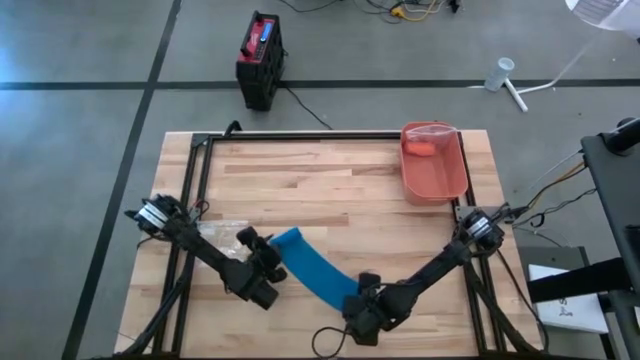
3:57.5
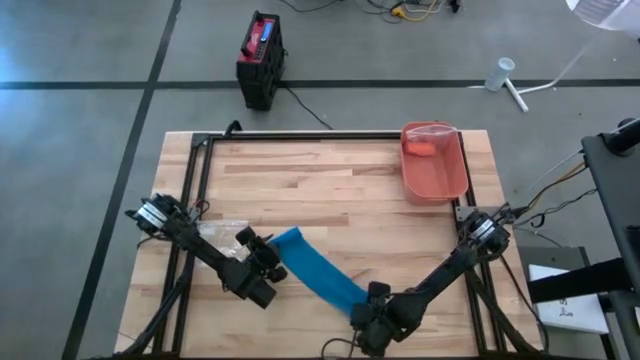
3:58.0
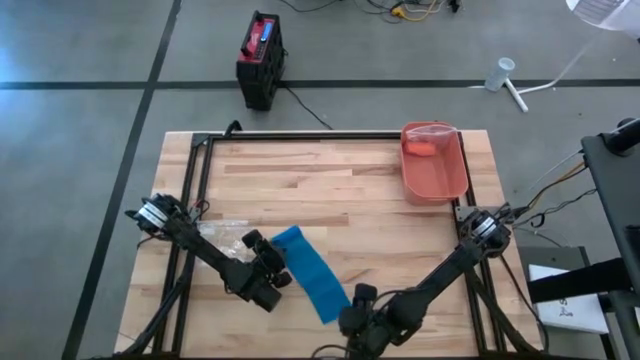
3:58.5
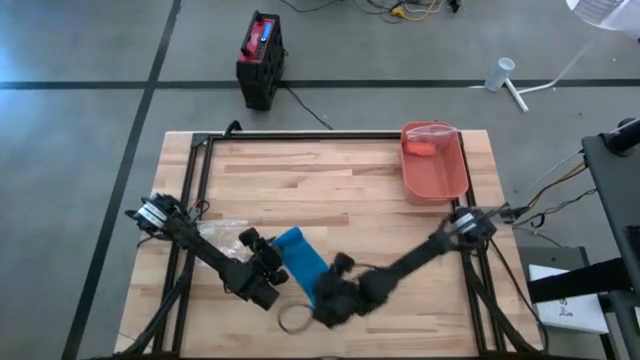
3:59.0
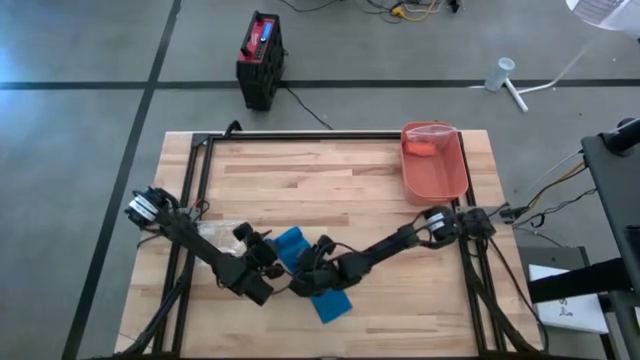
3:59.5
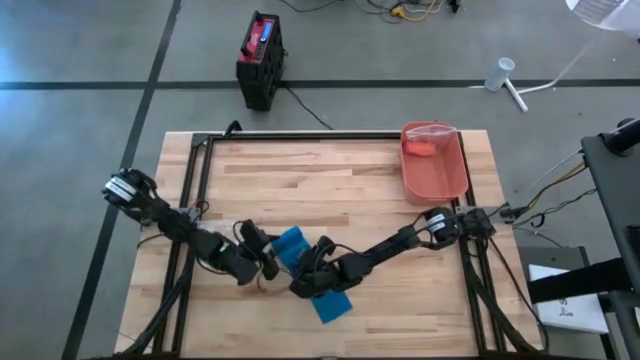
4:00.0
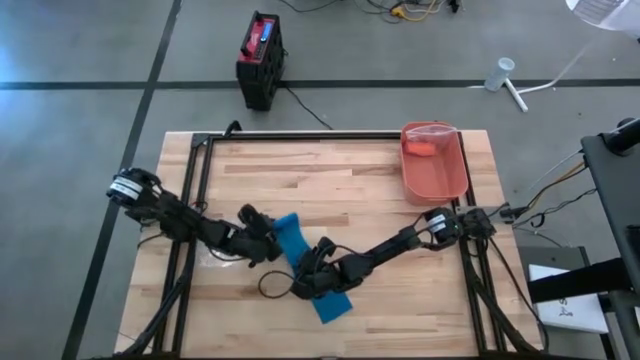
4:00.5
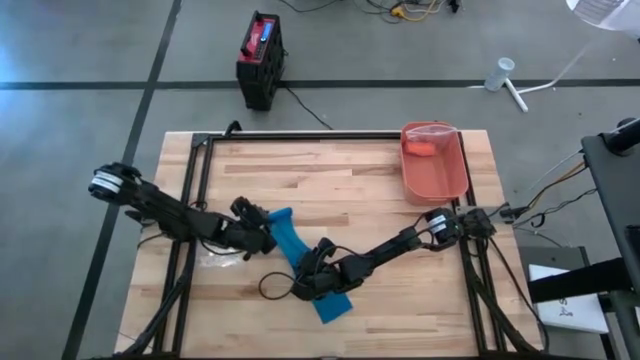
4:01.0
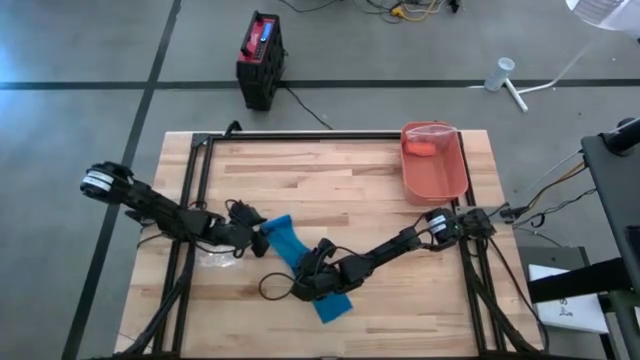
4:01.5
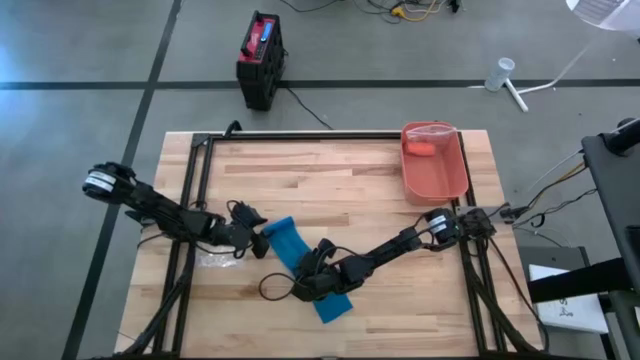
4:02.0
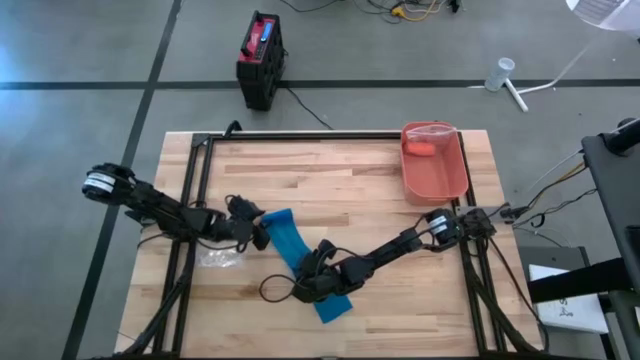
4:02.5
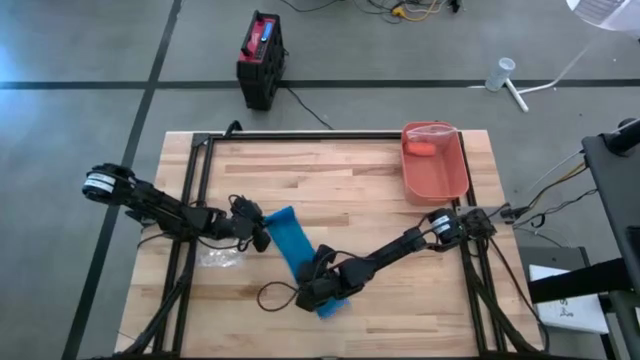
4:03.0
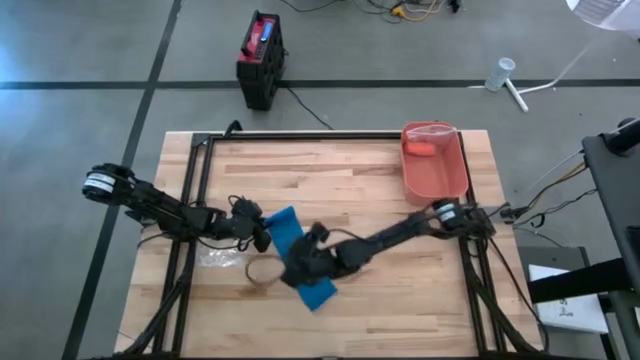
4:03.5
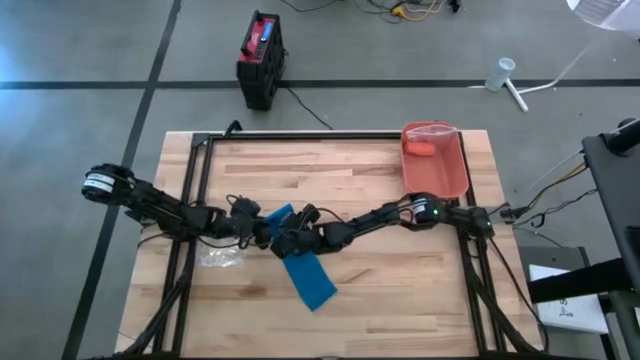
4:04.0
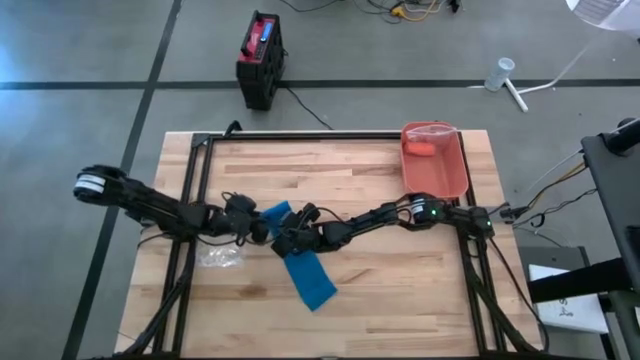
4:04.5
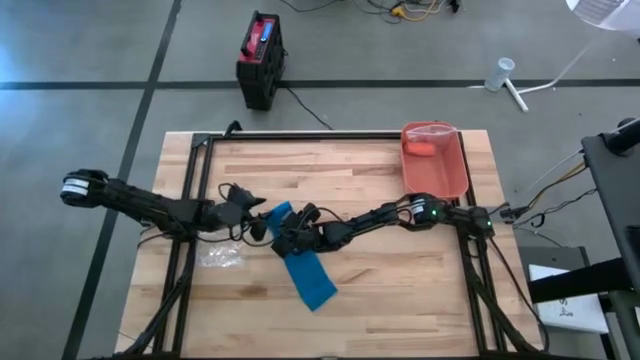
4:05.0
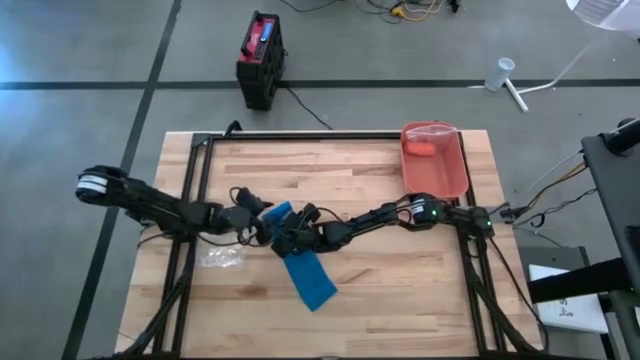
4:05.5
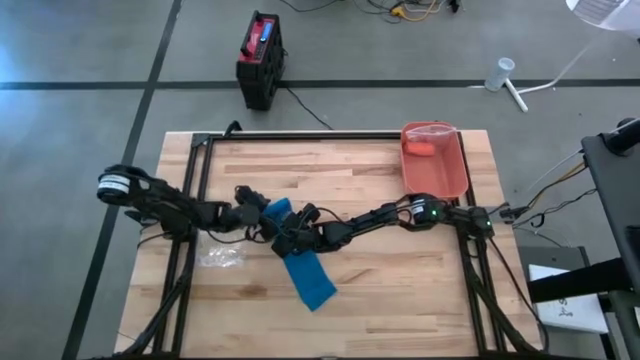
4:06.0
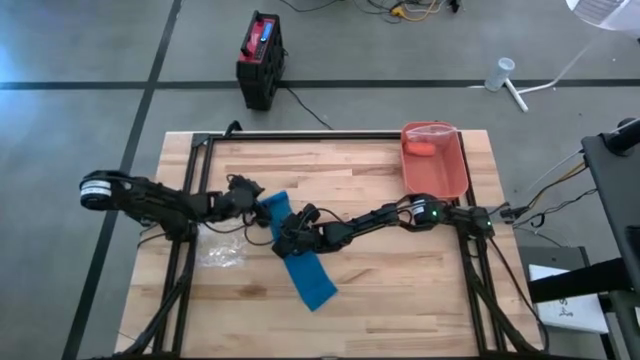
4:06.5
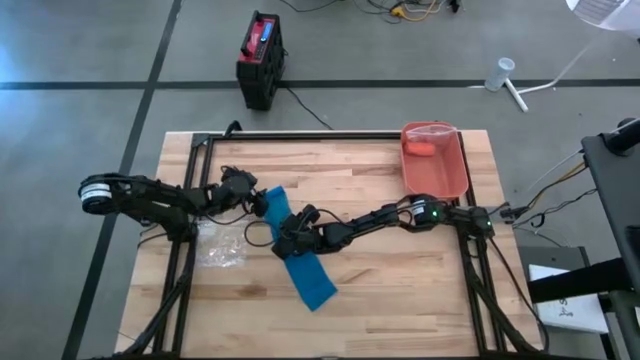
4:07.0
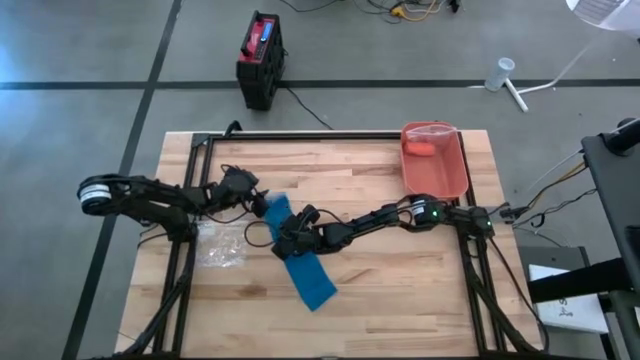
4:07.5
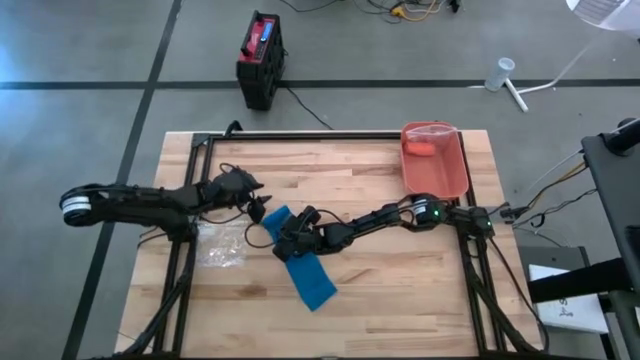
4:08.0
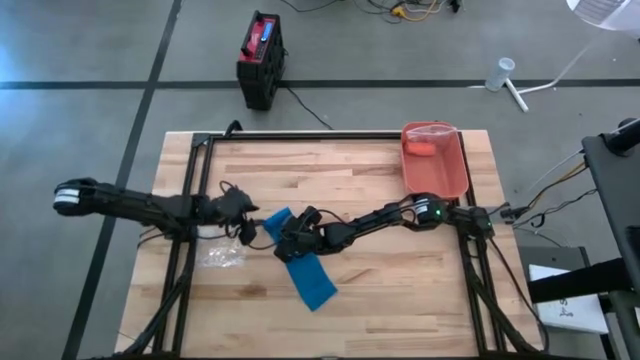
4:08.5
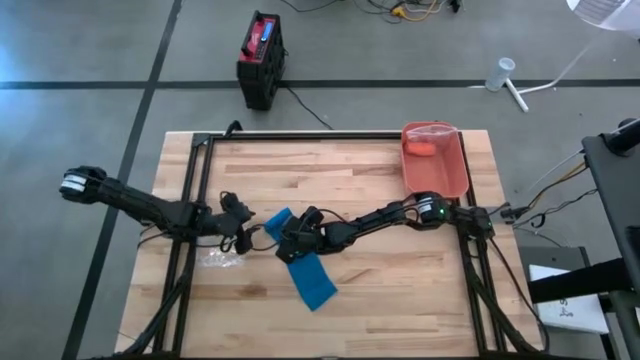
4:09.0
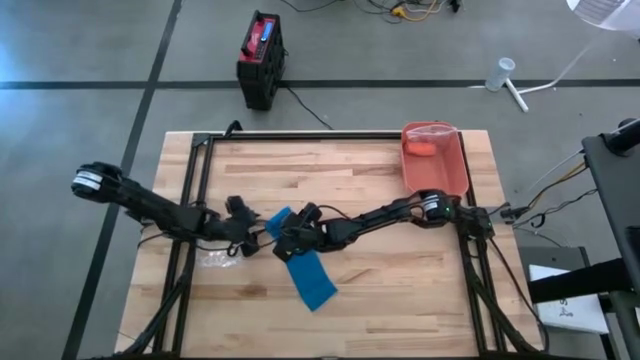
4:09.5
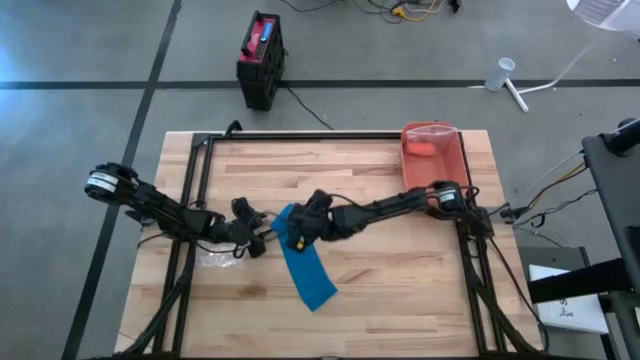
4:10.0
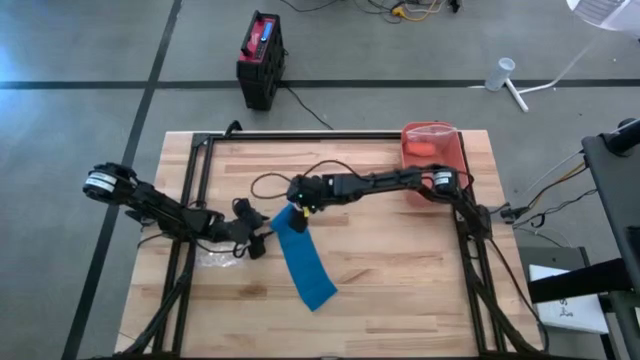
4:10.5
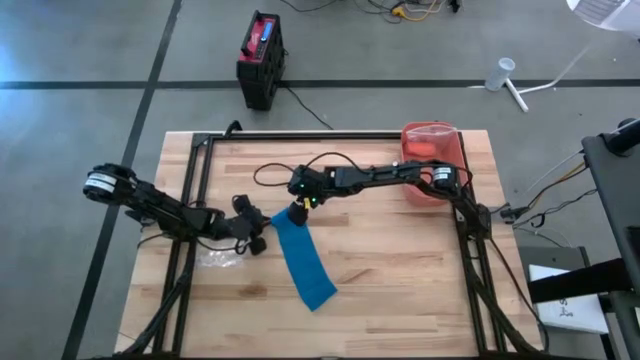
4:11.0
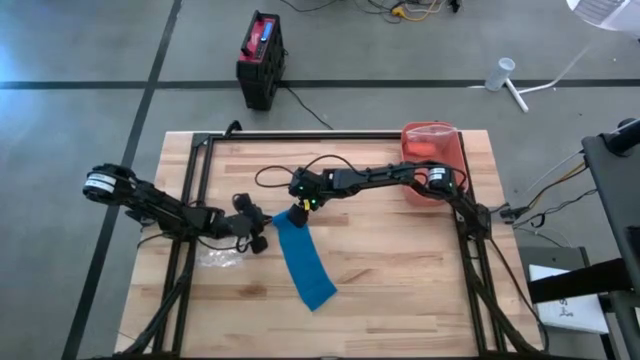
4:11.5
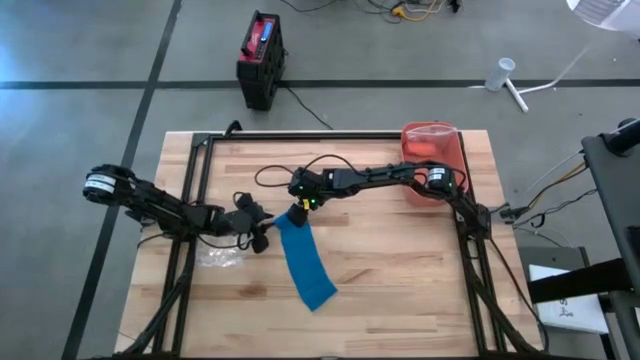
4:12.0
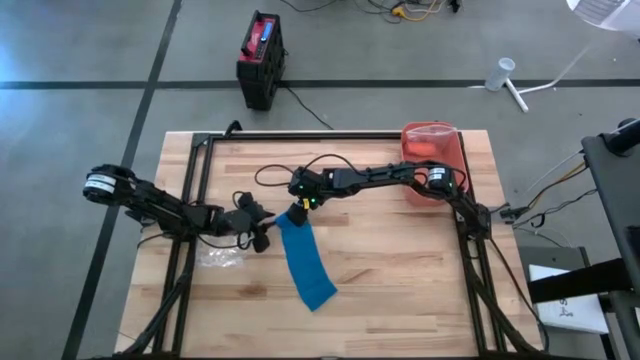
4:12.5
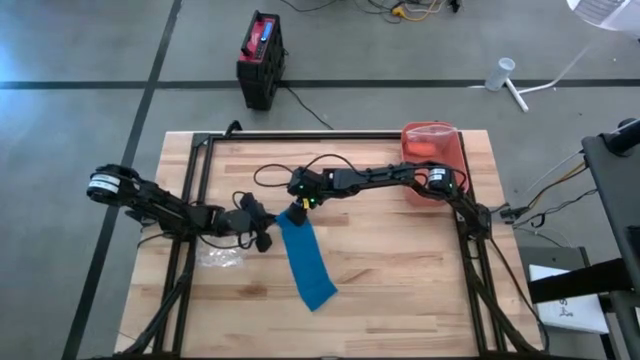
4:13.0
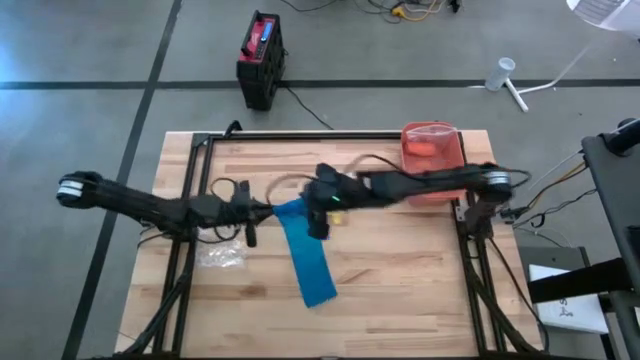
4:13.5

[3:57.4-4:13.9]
Task: Roll bandage
Roll the blue bandage

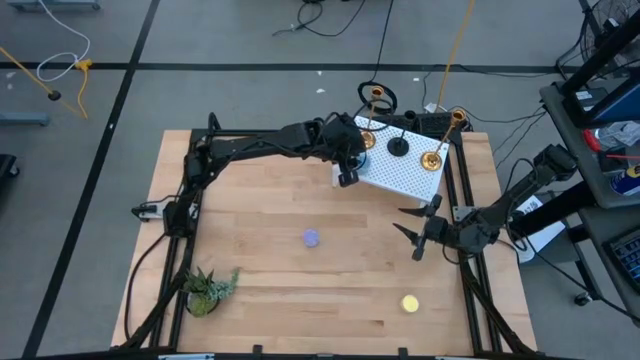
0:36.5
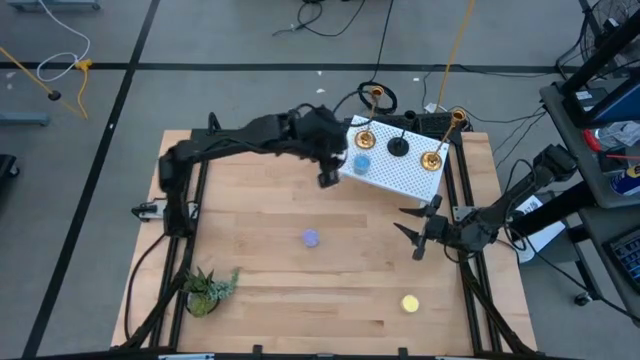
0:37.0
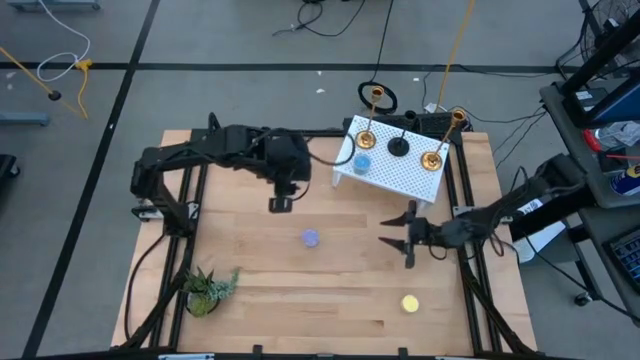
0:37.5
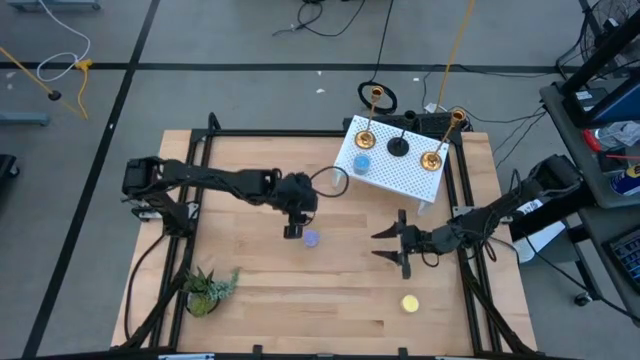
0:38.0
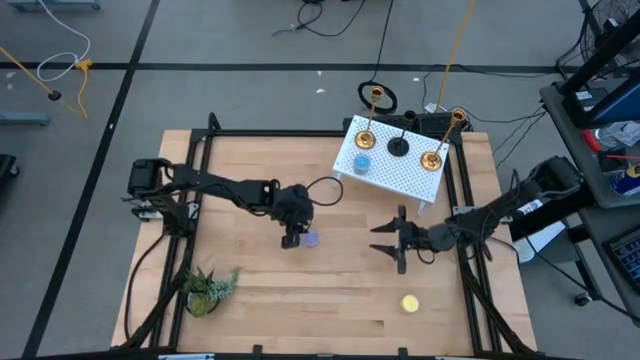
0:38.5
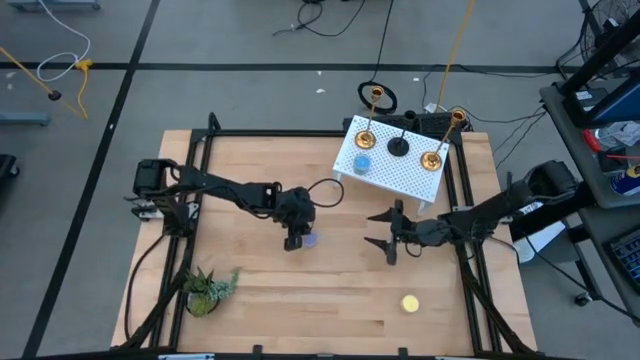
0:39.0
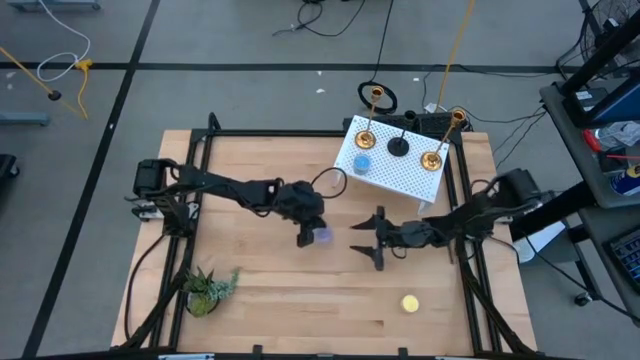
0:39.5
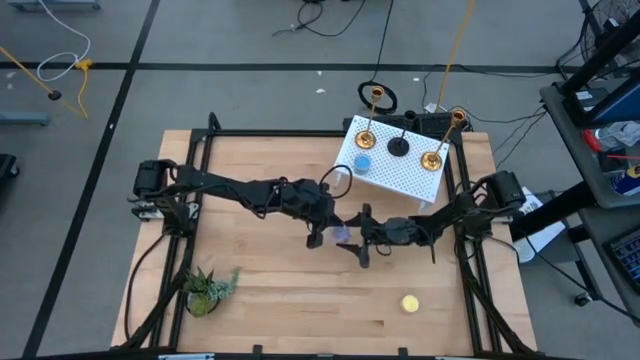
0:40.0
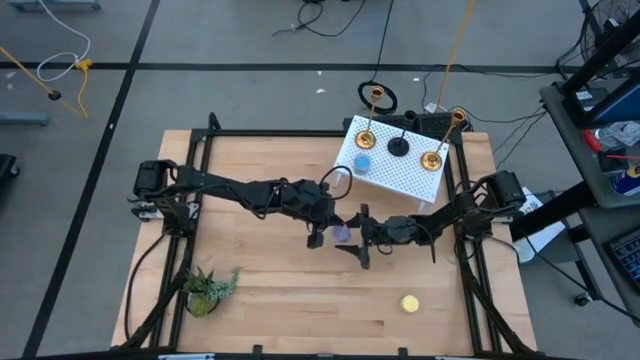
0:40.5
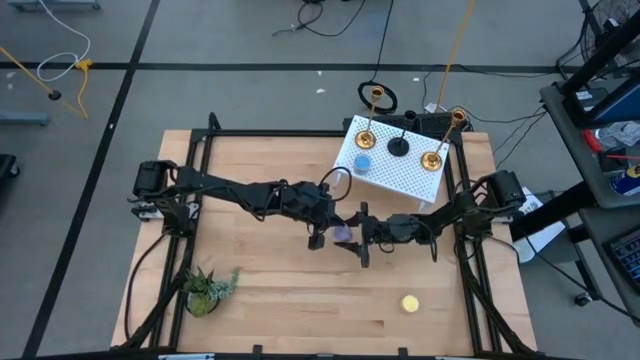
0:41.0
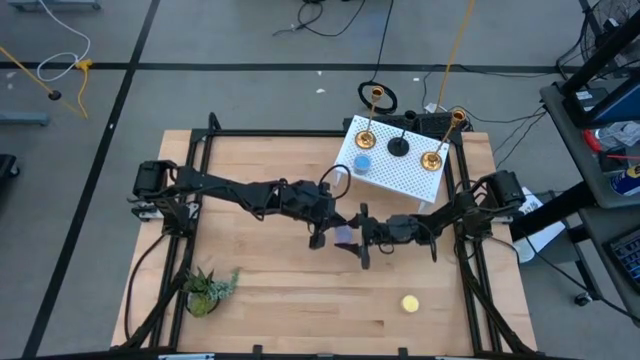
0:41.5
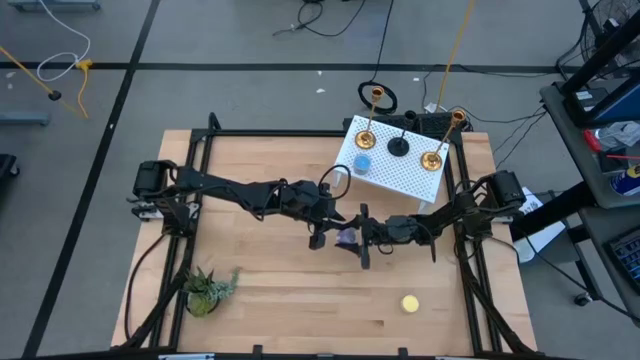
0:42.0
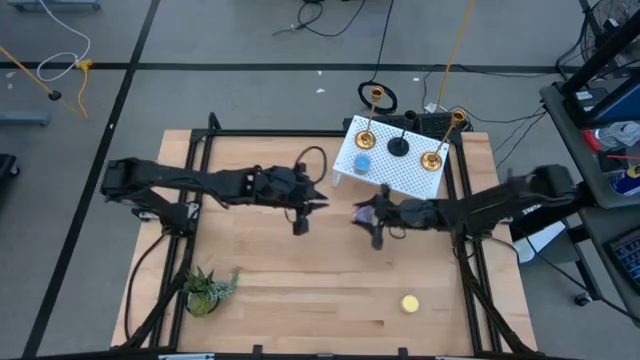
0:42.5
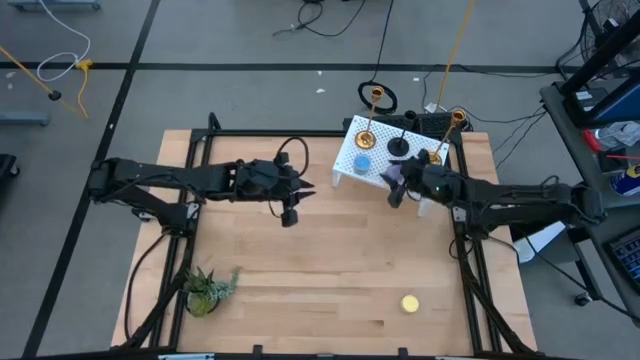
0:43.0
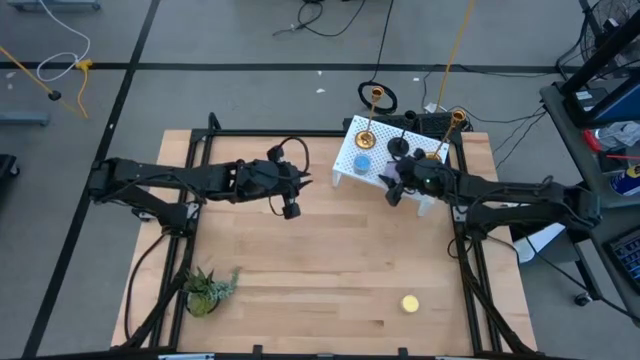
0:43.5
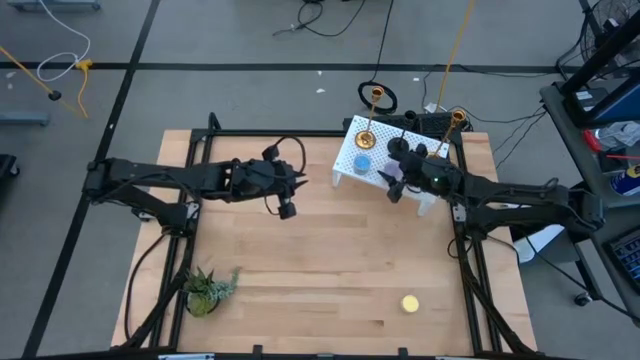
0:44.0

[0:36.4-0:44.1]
Task: Pick & Place candle stick holders
Put the purple scented candle on the shelf aligned with the blue scented candle
